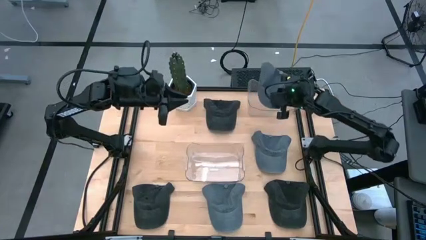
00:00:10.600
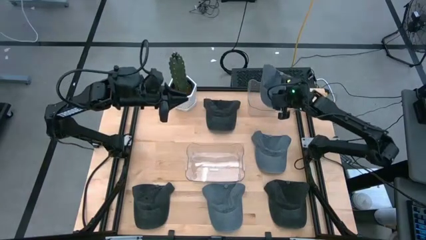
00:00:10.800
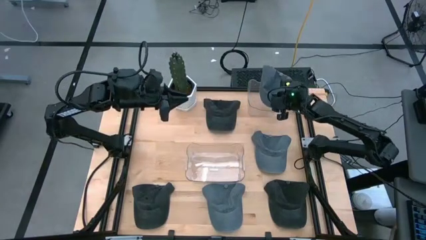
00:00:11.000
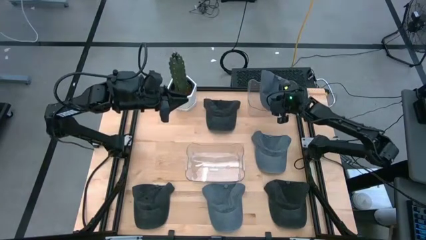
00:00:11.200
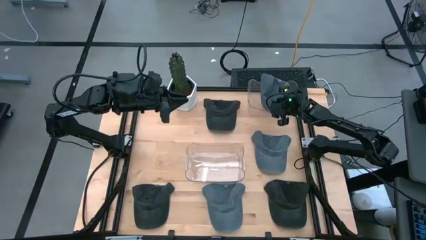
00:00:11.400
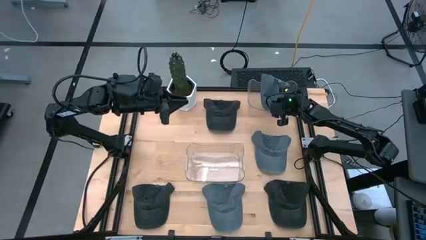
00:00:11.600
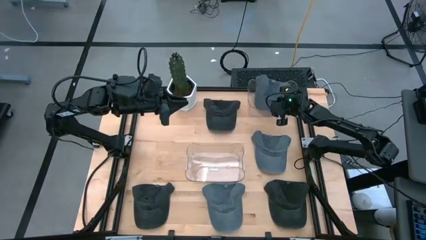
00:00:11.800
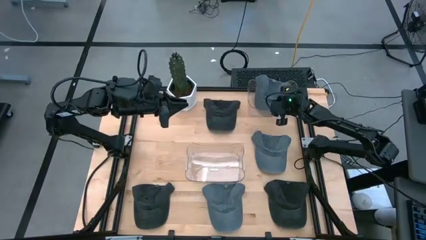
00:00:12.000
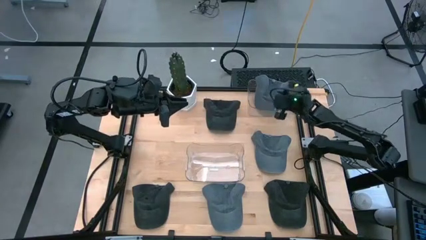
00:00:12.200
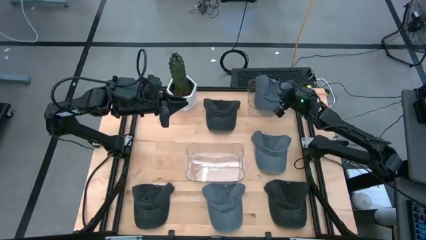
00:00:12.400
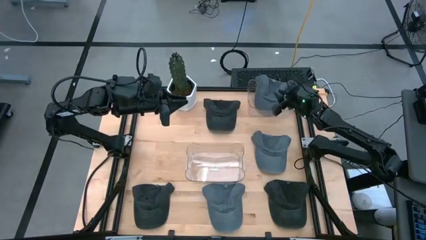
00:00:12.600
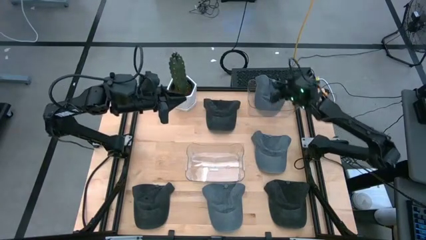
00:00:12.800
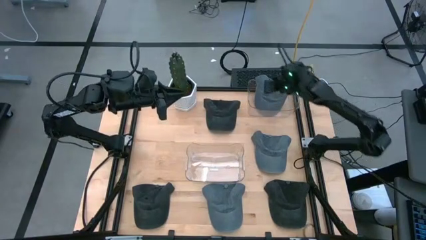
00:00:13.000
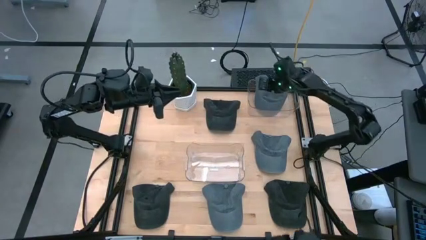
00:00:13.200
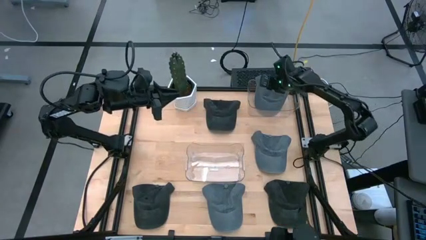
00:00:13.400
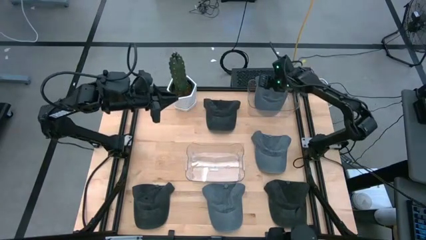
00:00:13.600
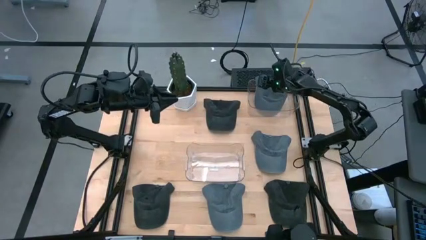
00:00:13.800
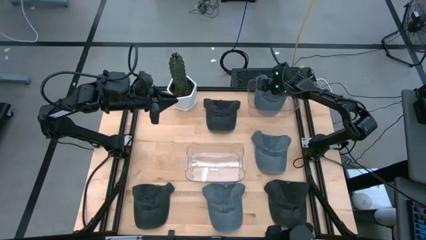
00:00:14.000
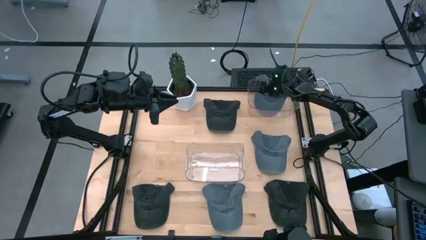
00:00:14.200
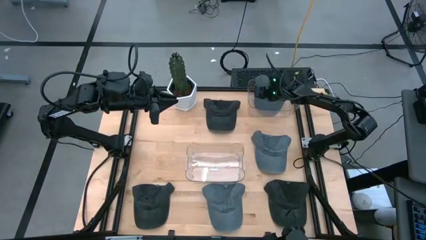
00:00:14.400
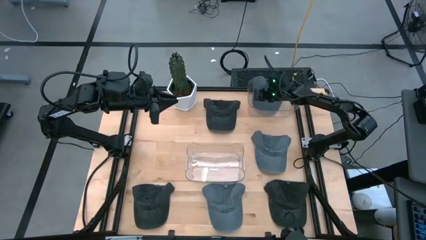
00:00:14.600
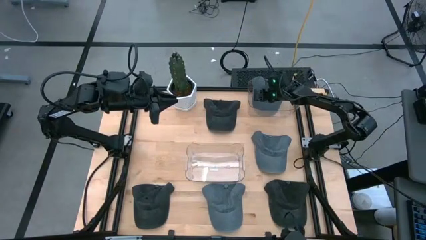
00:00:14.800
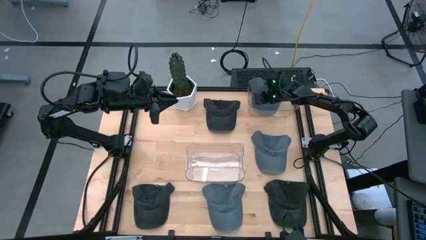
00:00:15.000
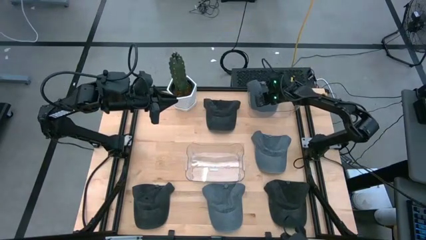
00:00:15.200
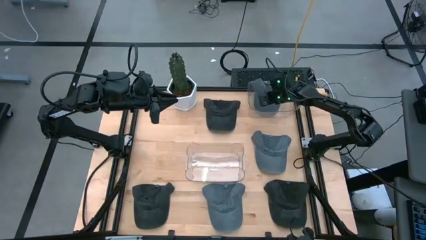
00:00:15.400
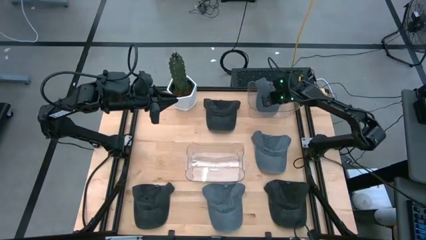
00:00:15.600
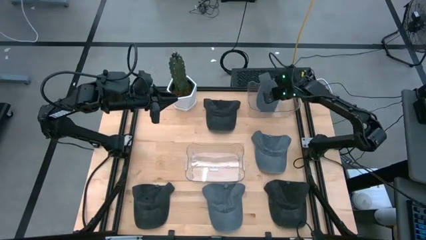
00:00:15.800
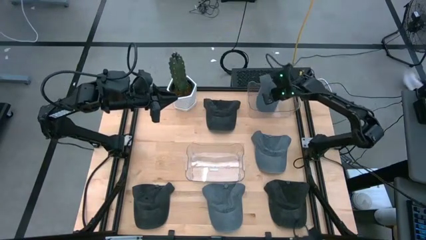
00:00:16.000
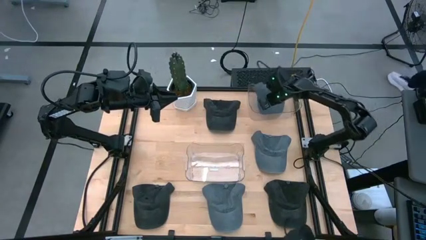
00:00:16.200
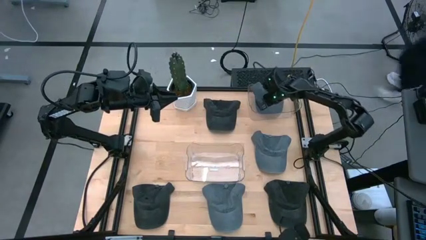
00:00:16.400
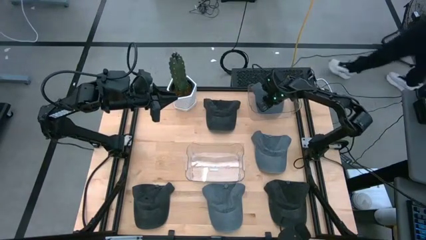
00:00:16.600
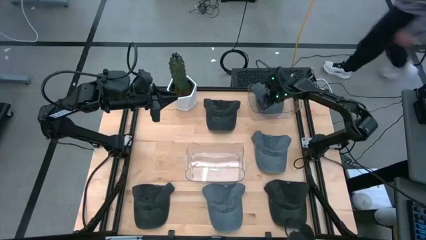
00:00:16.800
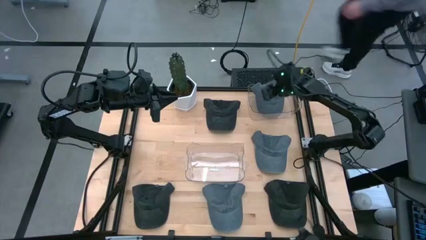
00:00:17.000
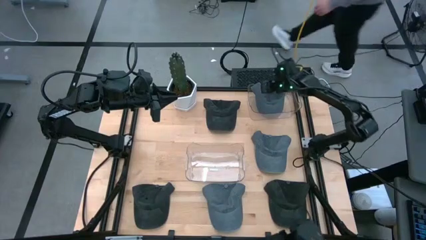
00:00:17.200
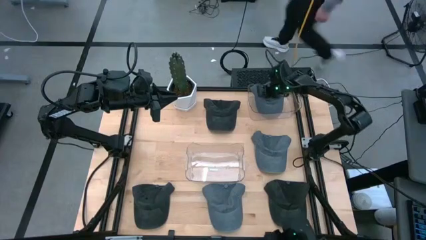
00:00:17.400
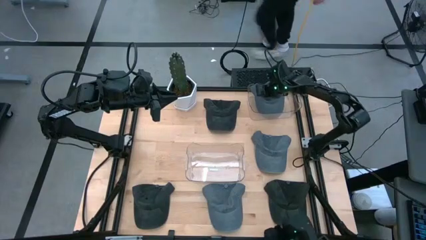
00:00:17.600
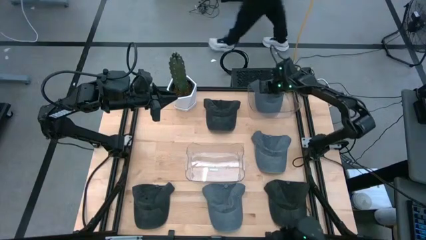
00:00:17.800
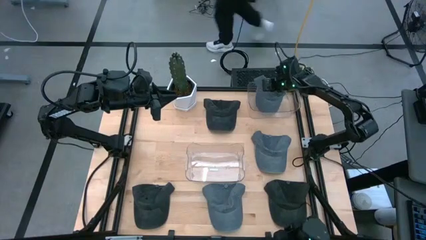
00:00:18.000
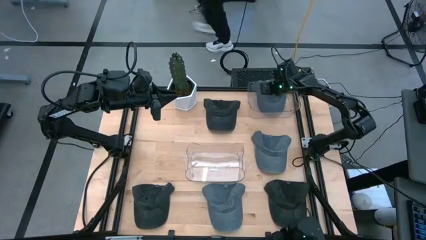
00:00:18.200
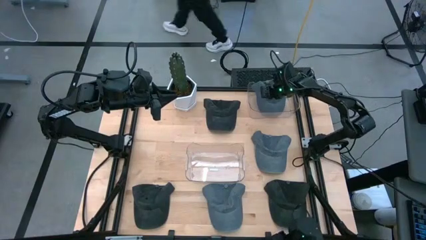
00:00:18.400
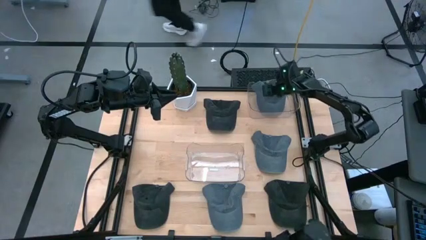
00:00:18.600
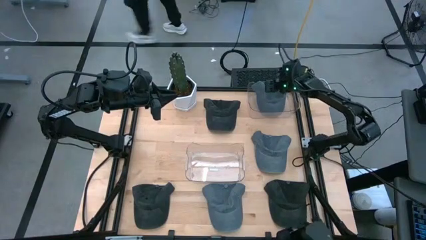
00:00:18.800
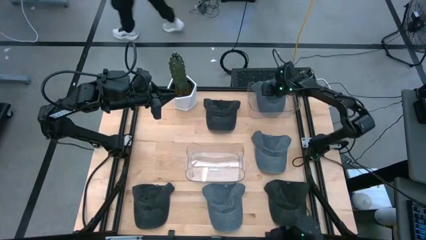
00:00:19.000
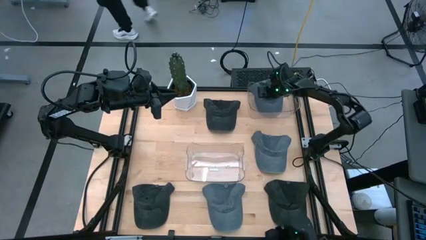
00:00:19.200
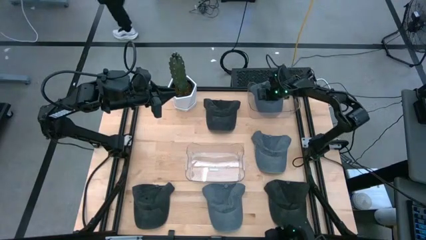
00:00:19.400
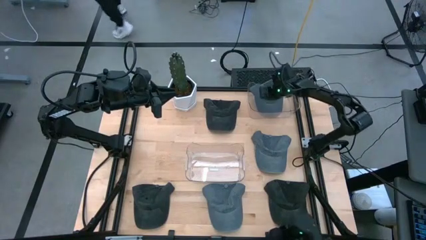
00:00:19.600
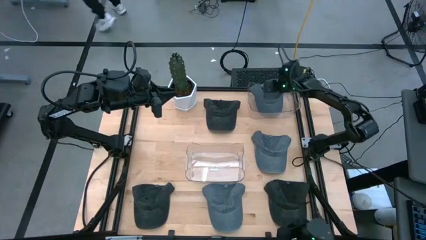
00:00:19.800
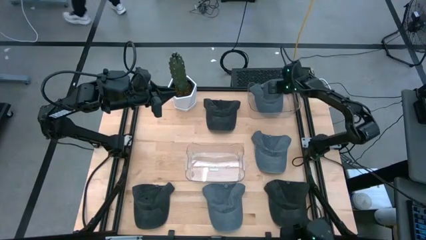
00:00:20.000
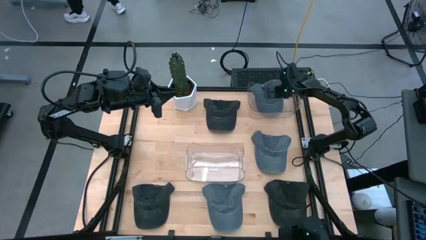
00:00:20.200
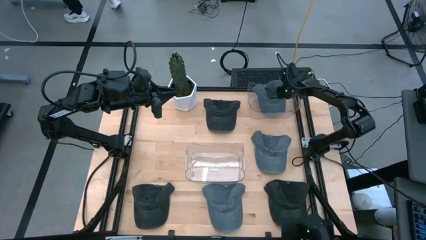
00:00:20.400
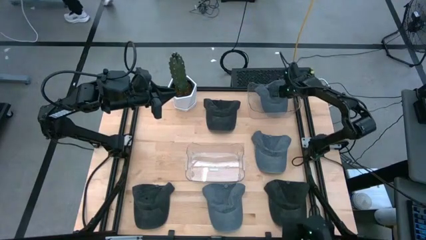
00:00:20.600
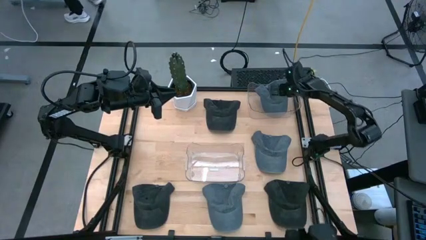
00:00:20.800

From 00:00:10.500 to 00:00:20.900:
Task: Pick & Place hat
Put the top left gray cap into the top transparent bin

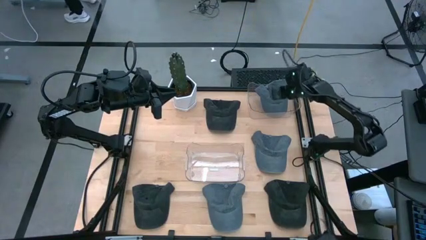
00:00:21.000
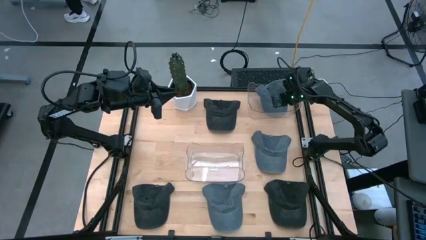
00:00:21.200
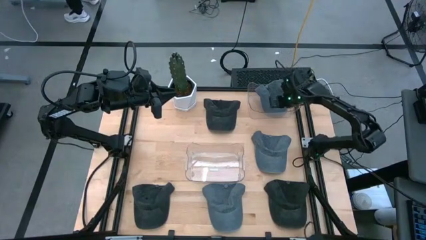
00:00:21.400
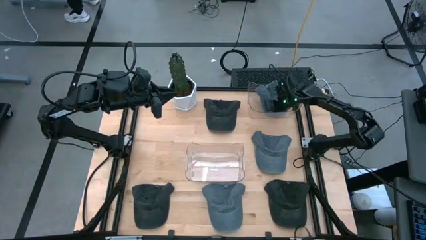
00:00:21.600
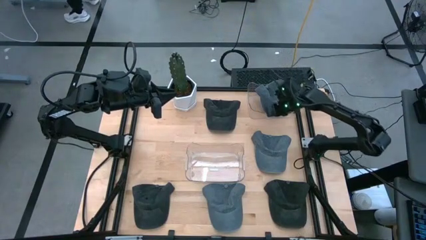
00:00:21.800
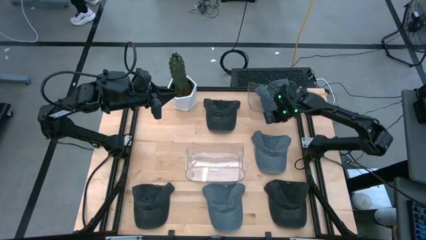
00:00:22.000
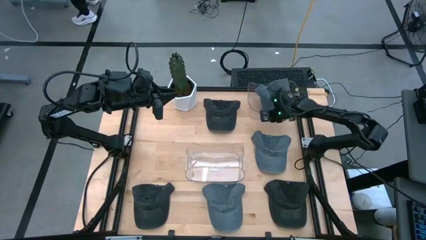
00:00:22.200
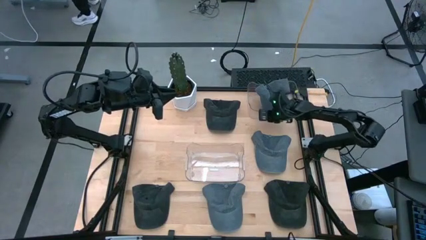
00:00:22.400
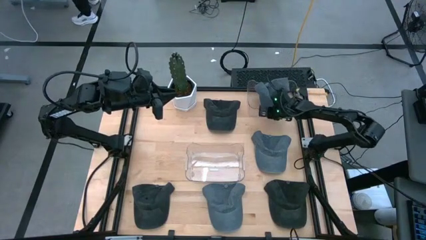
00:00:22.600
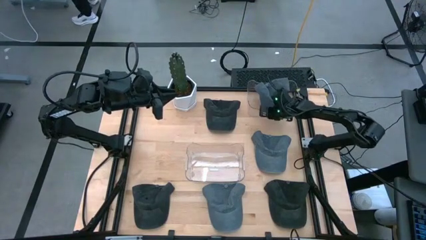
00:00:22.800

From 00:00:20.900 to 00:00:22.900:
Adjust the top transparent bin on the table

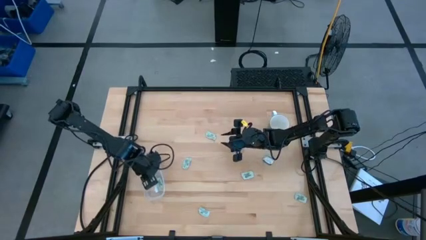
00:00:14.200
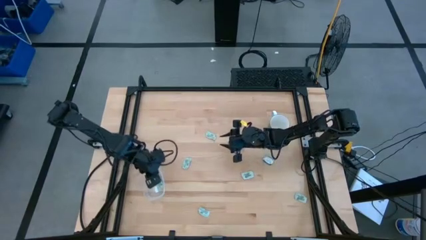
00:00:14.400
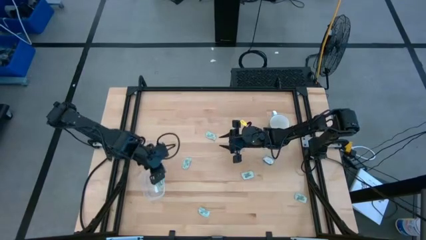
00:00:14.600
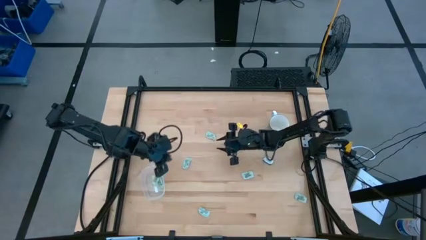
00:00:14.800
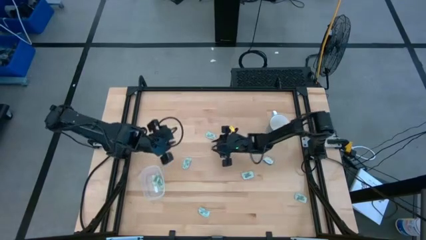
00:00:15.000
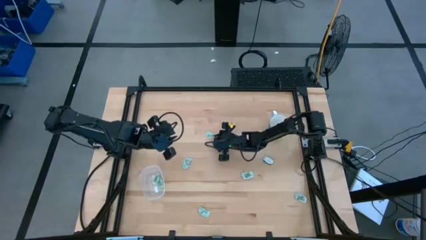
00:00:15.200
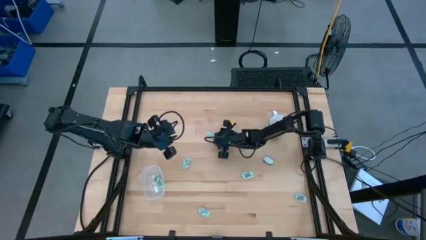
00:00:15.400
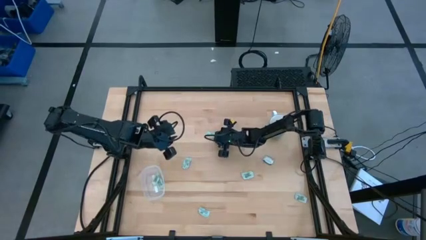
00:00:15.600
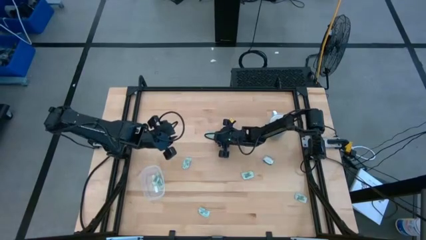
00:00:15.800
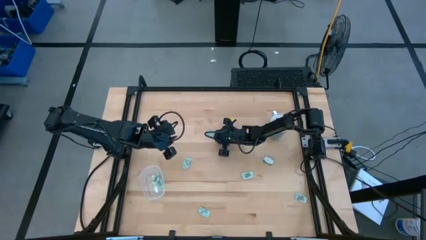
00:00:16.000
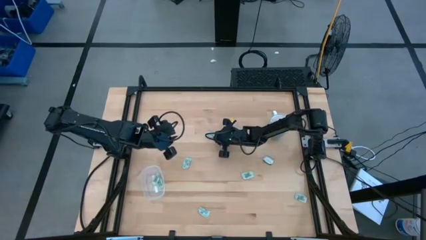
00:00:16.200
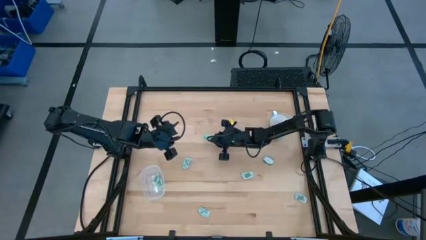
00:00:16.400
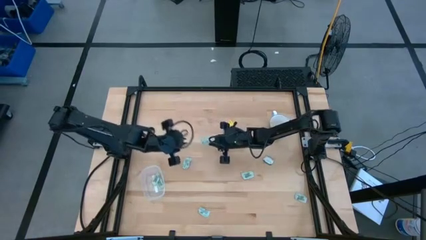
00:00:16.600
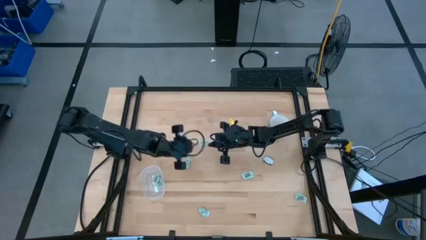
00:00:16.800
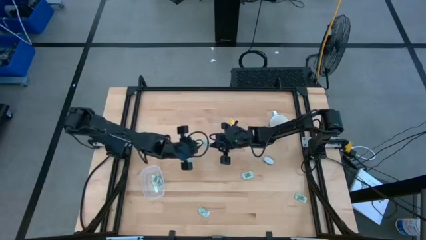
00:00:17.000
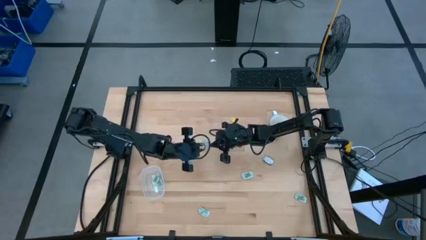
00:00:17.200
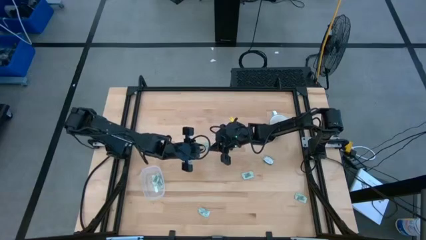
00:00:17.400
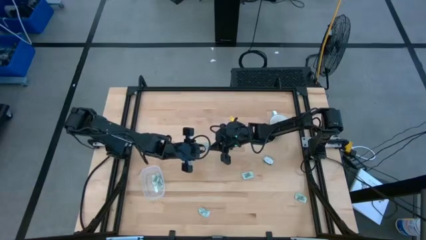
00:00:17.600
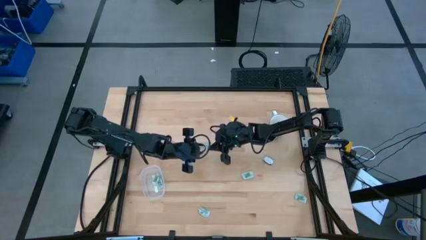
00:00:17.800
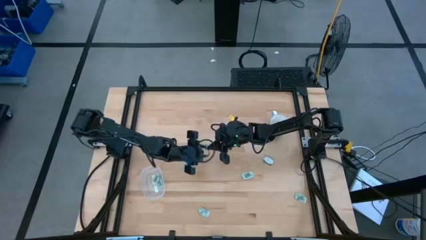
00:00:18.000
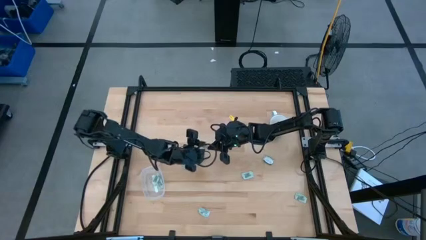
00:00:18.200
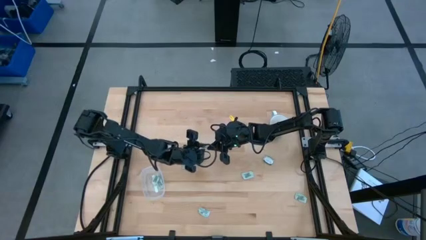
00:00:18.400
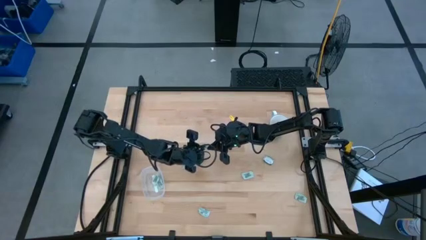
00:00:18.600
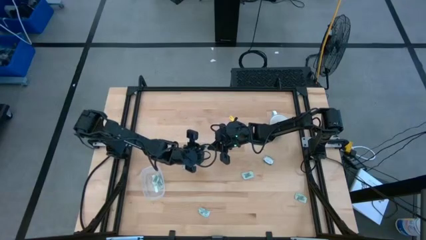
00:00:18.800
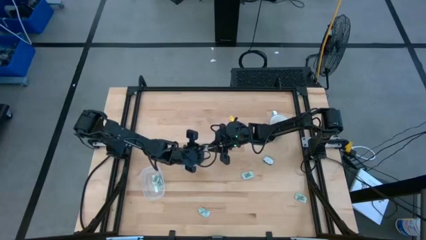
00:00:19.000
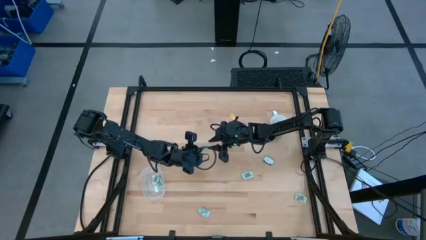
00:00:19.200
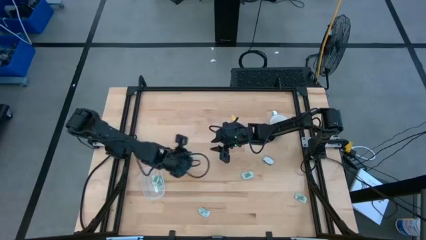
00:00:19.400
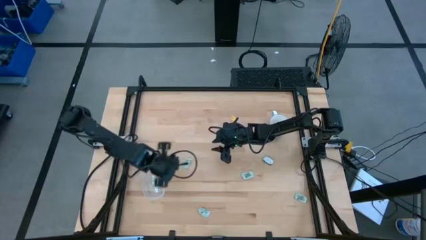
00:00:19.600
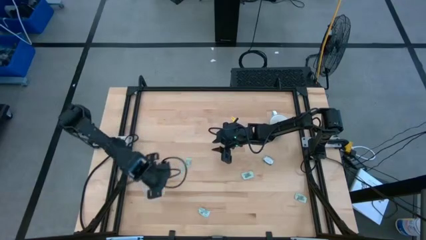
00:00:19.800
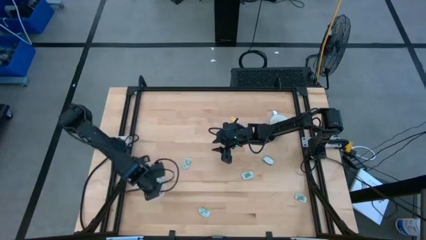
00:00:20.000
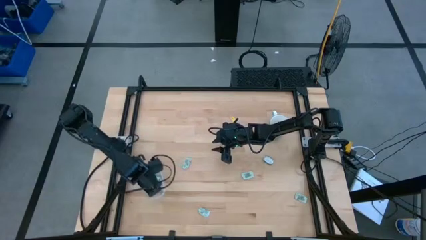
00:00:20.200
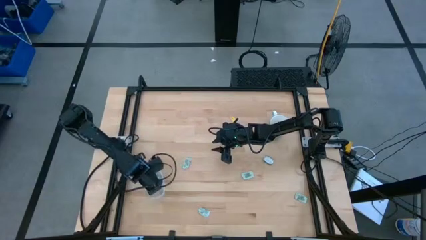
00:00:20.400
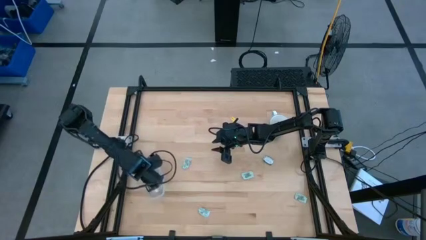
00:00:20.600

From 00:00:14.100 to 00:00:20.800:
Task: Pick and place Stevia / Truvia into bins
Put the stevia packet into the transparent container
